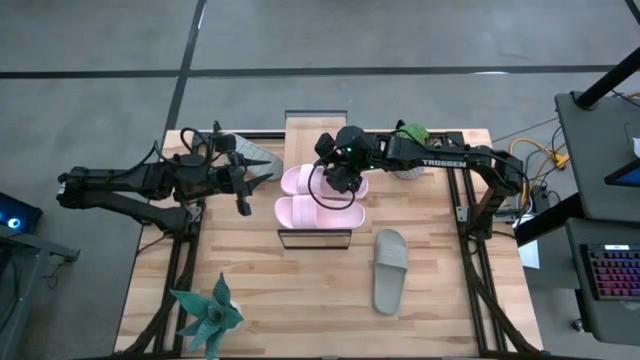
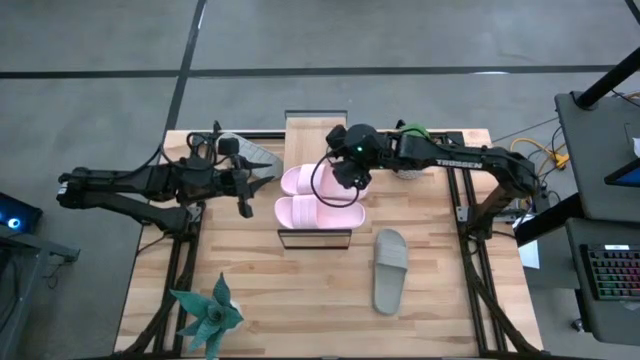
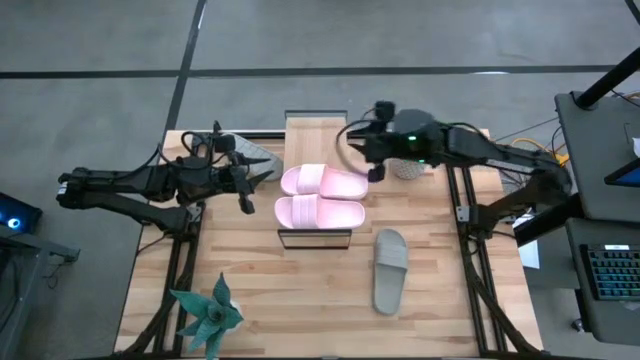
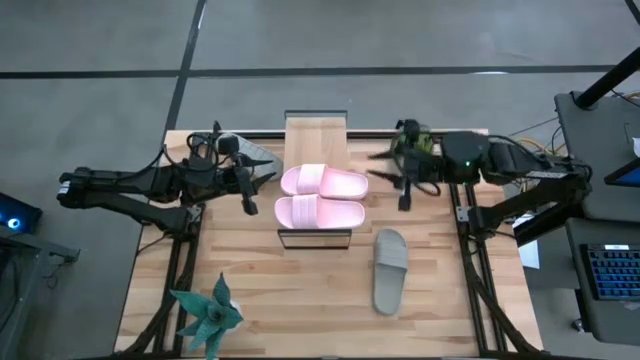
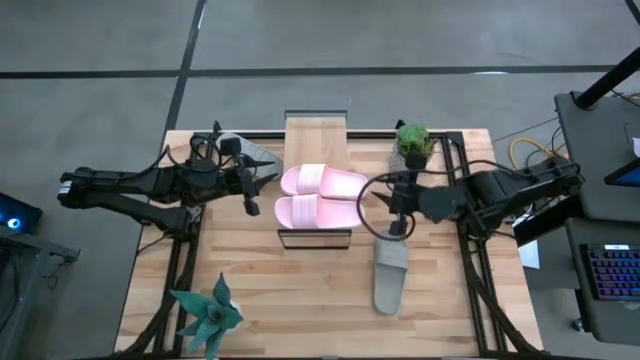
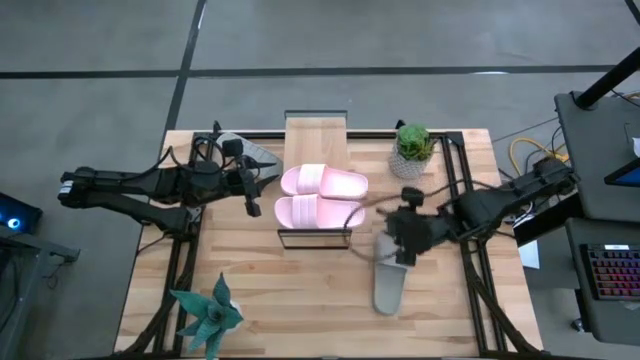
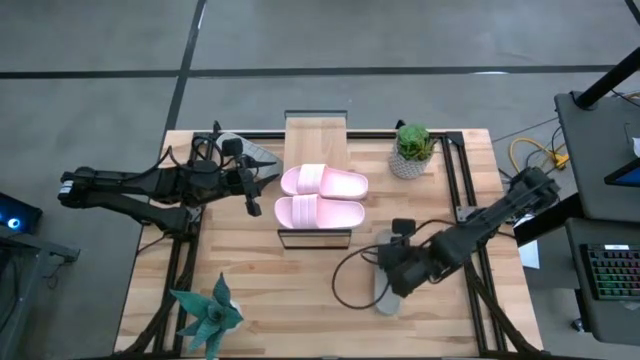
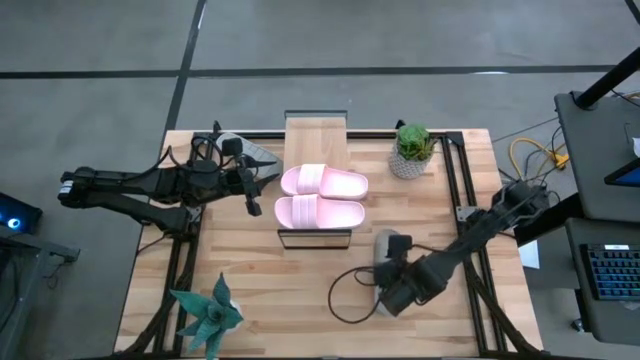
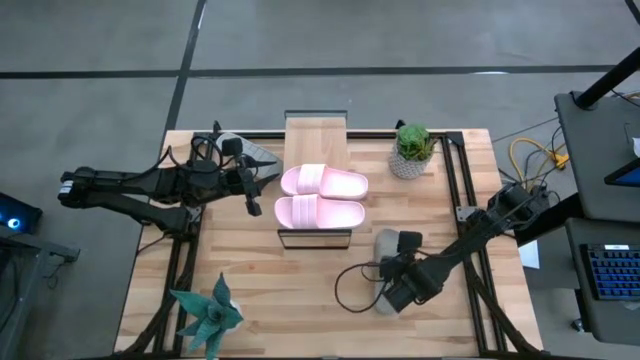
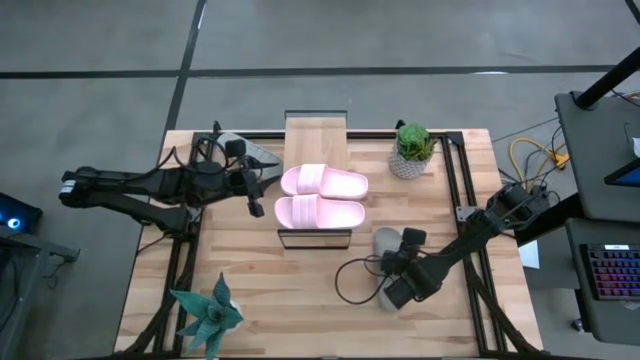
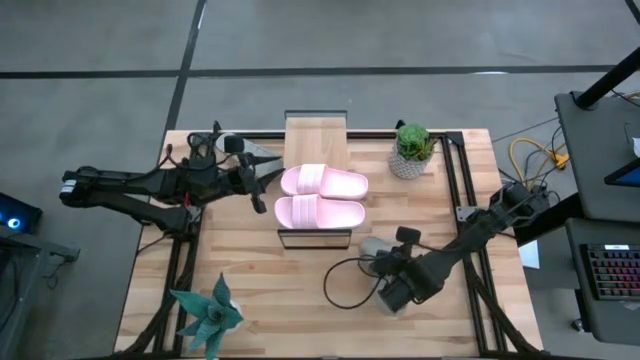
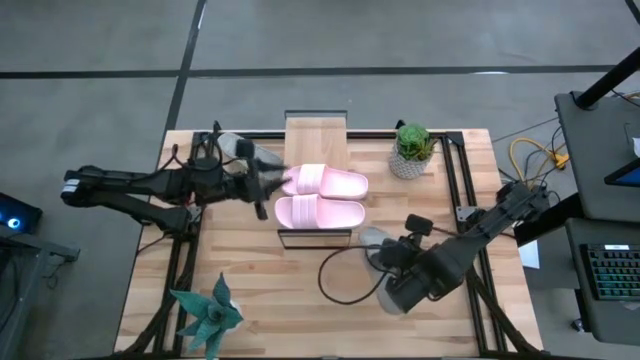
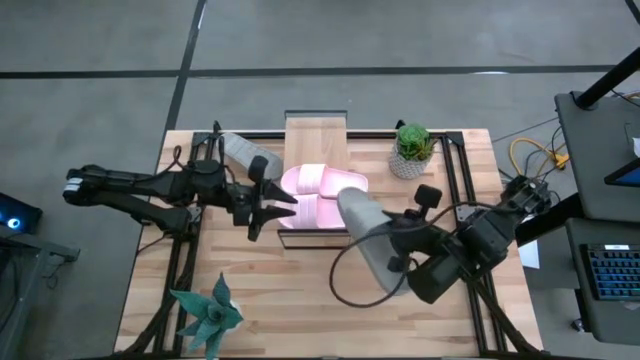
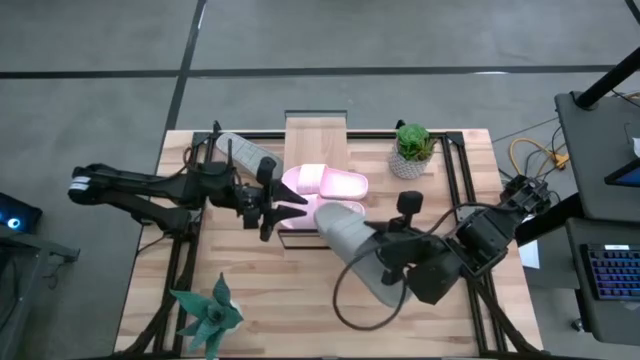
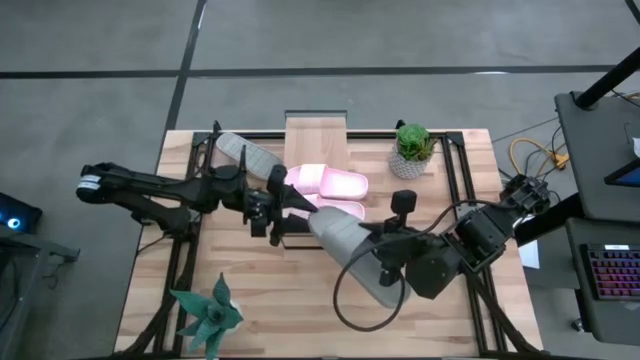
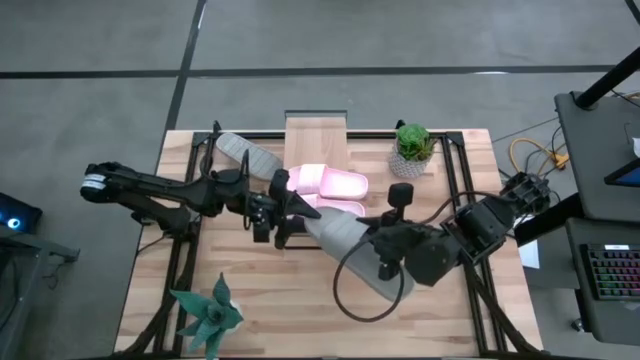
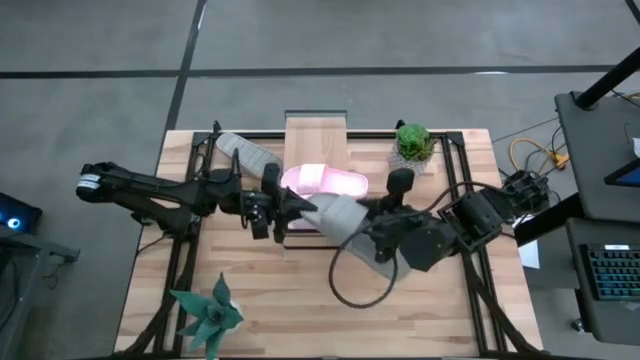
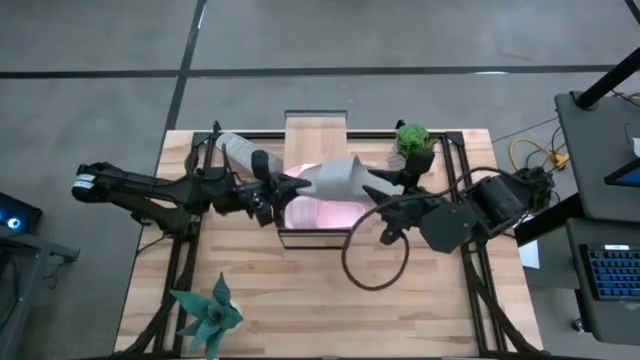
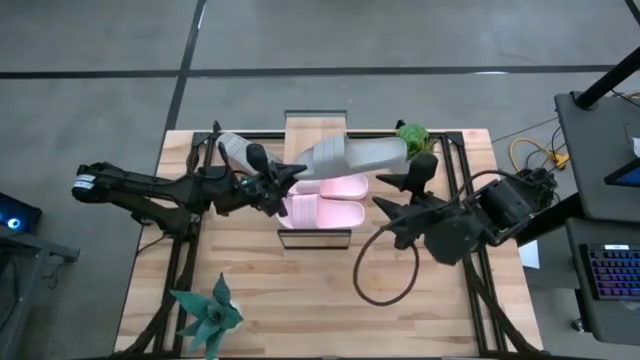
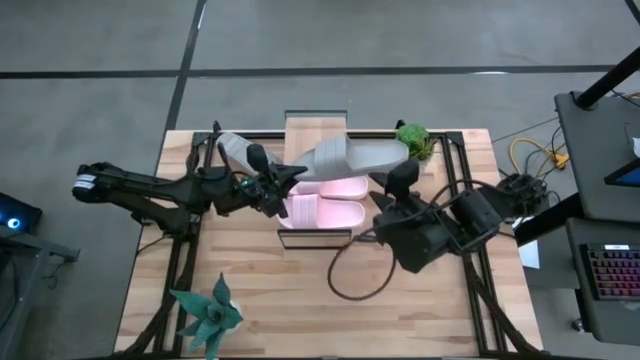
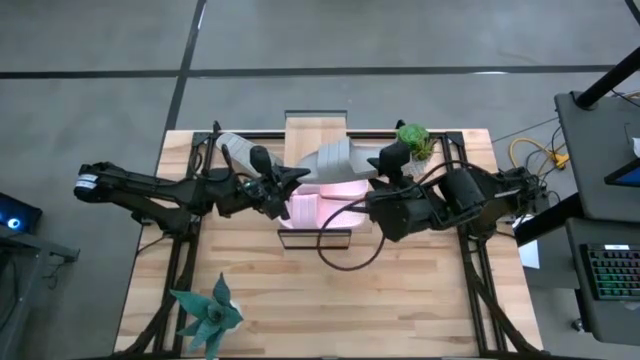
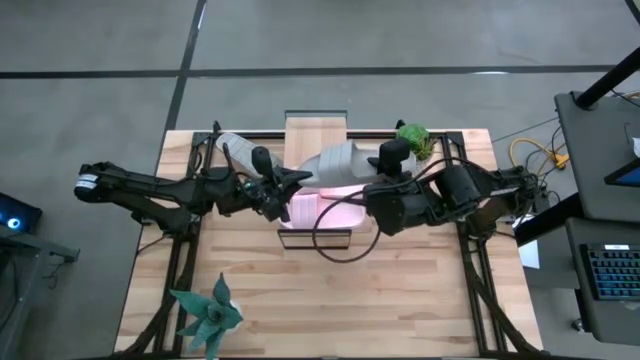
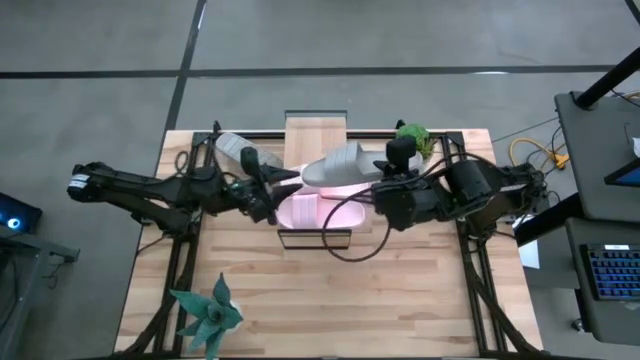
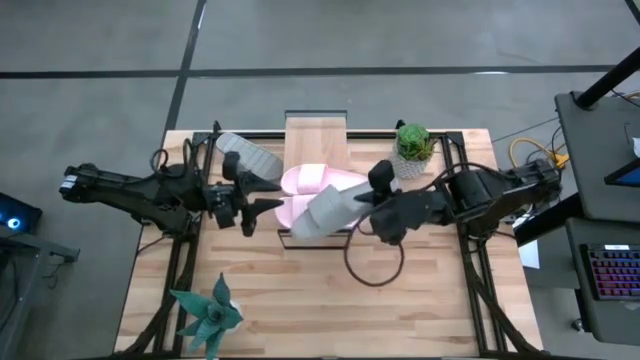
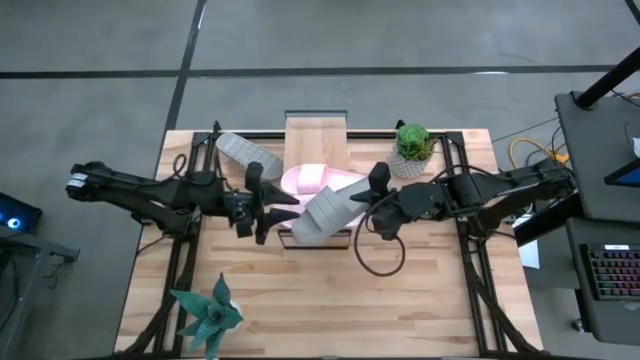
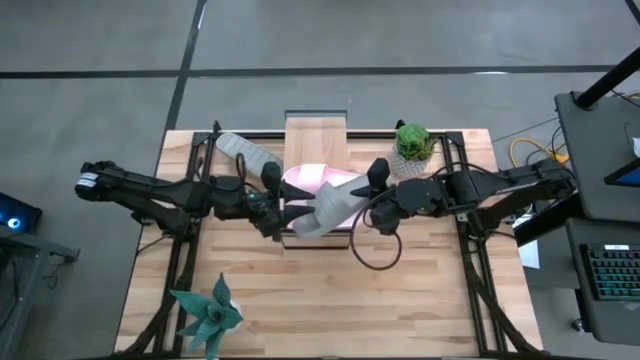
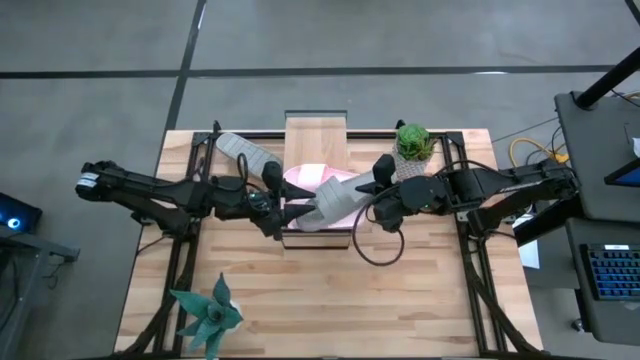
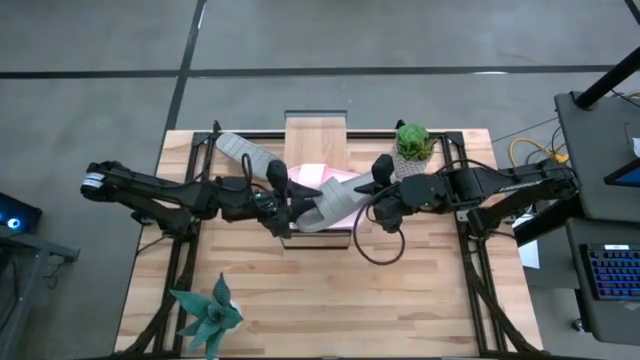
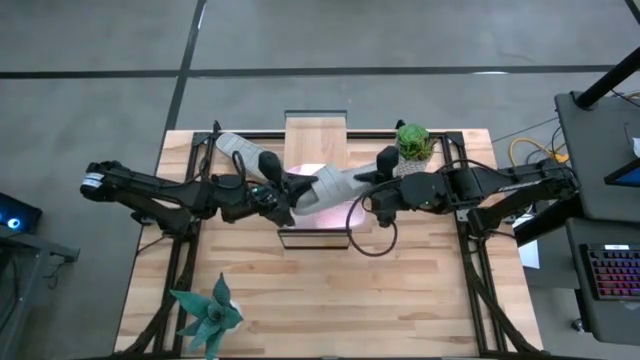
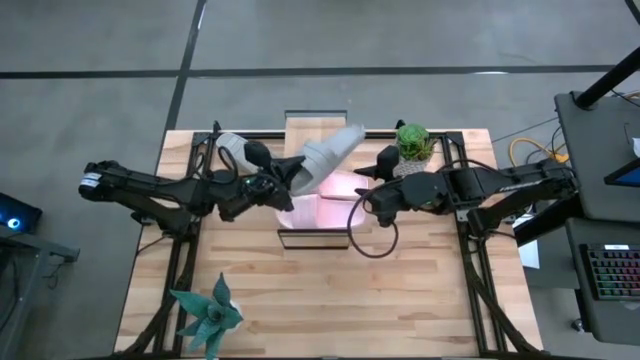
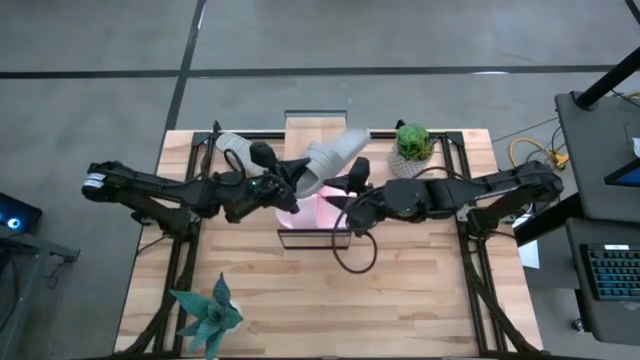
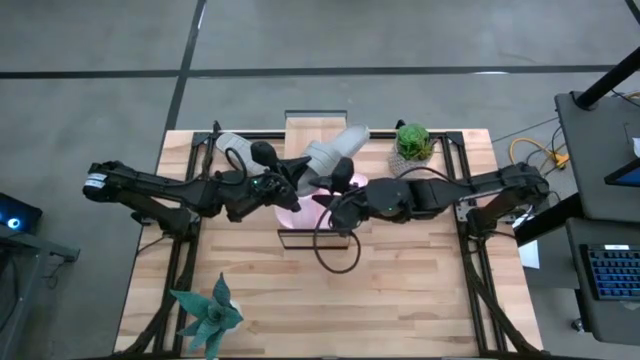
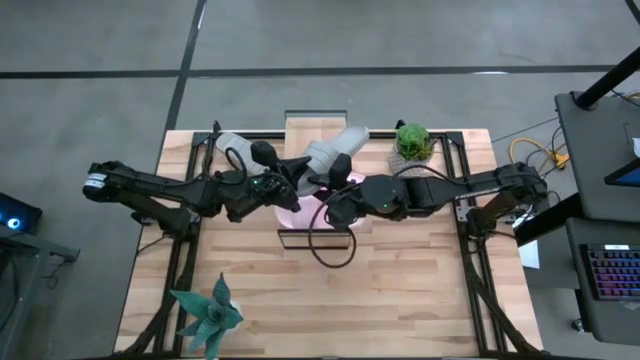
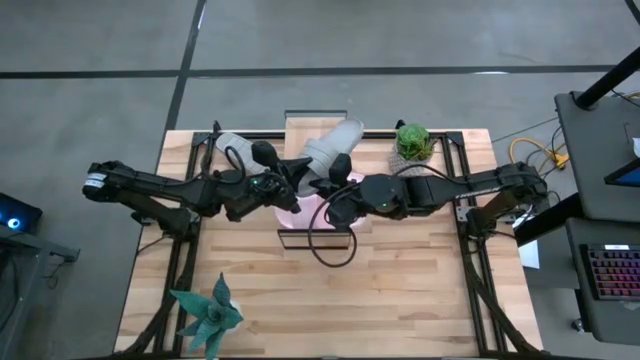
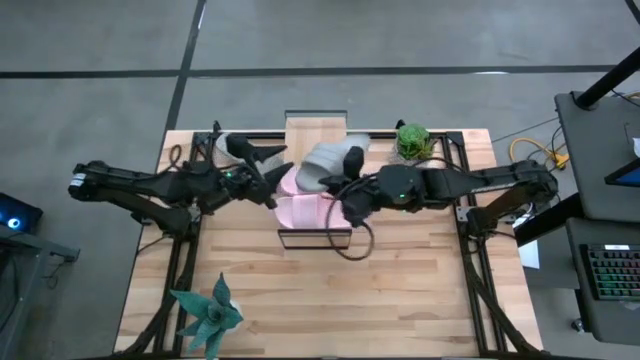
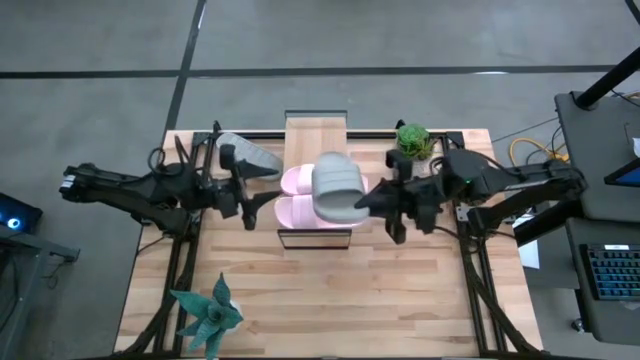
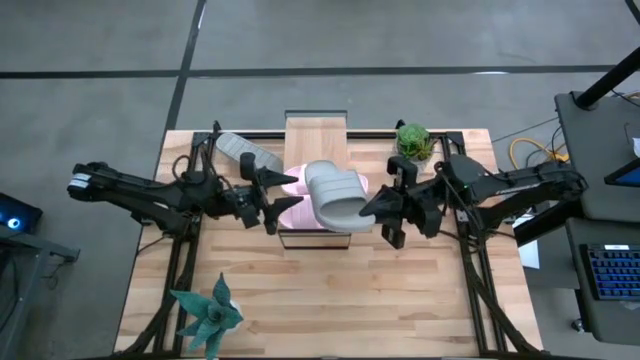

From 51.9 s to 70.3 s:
Task: Pick and place slides into the shelf
Put the bottom gray slipper on the shelf
